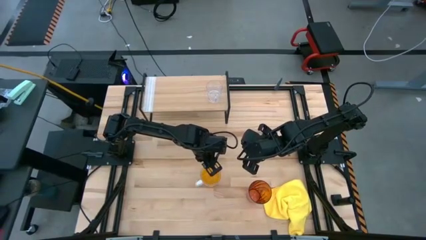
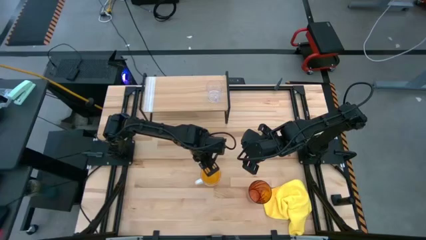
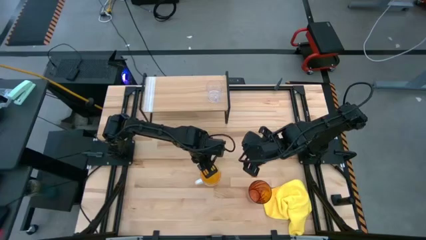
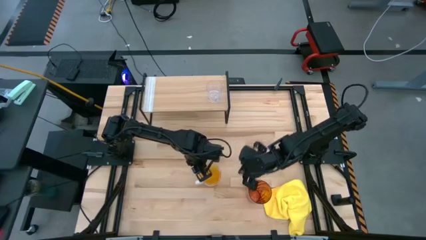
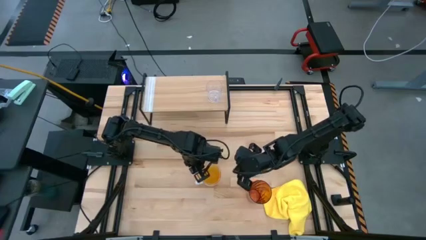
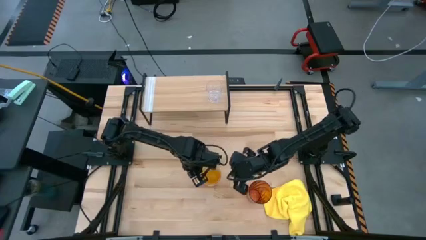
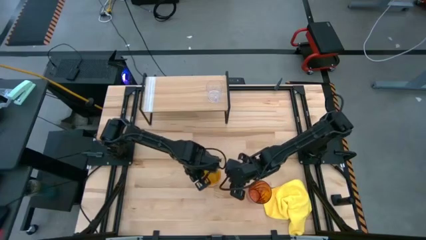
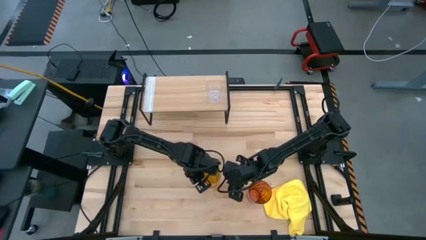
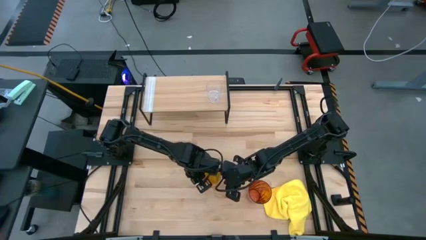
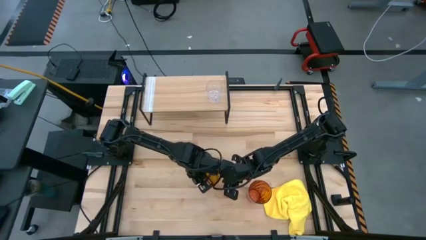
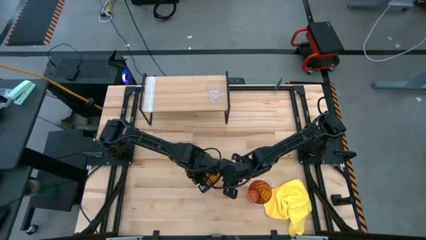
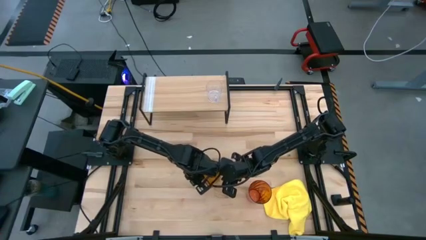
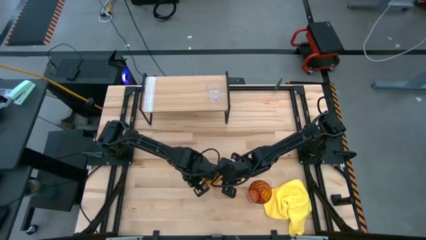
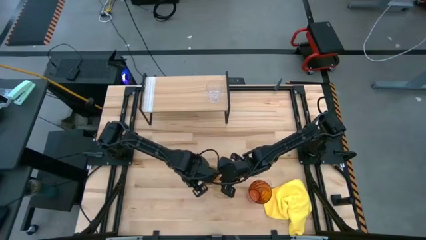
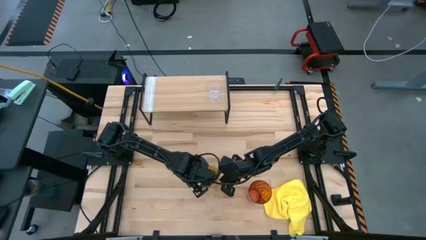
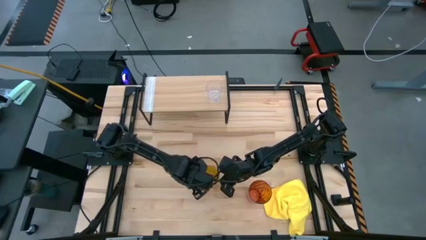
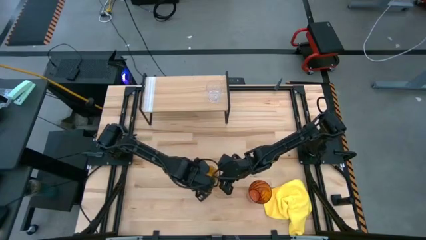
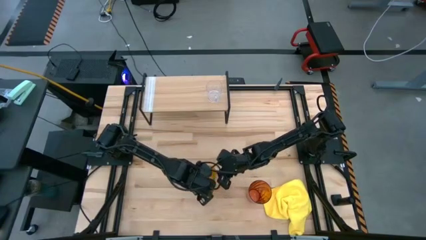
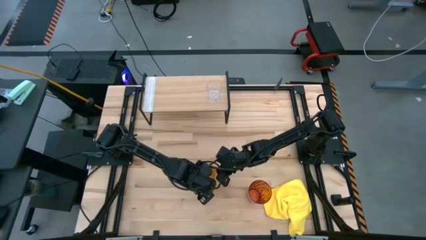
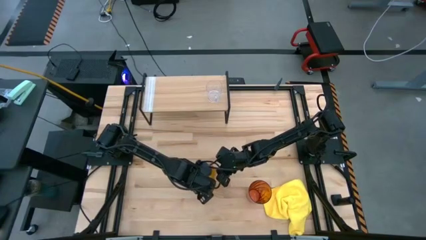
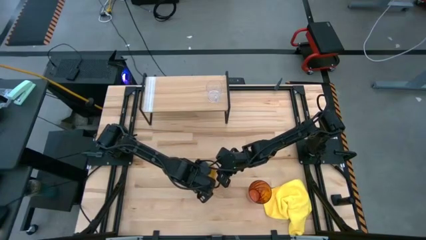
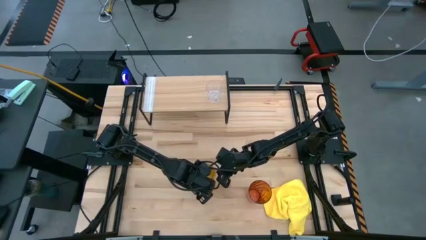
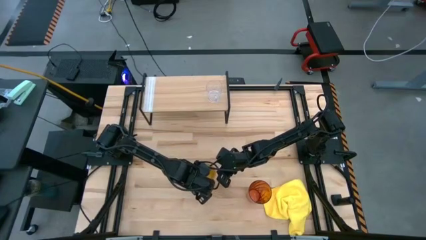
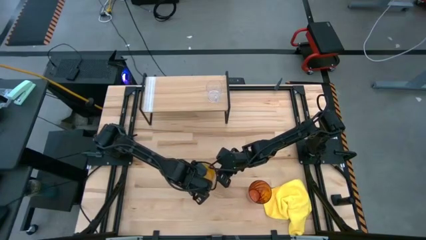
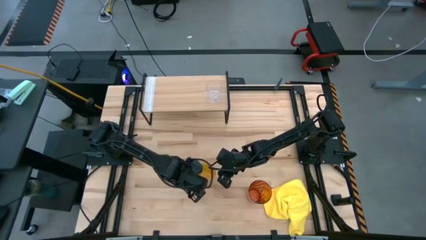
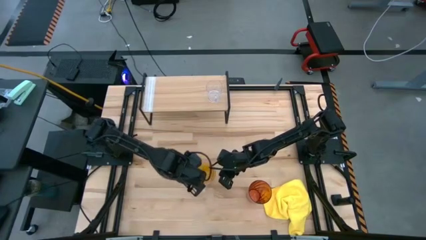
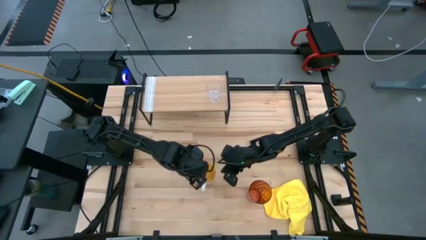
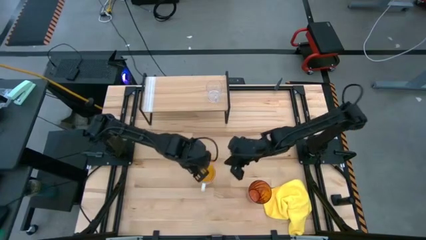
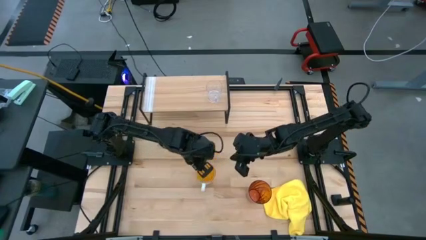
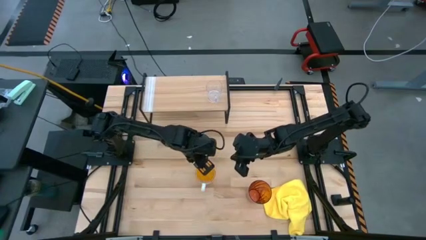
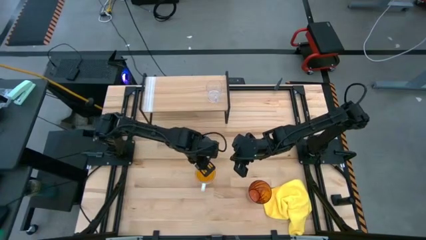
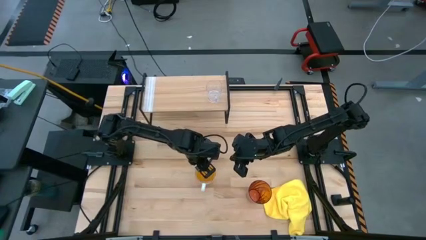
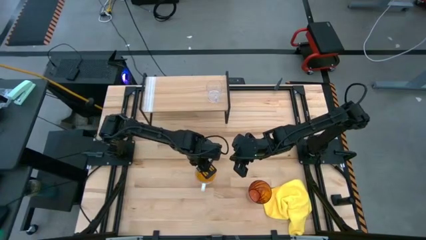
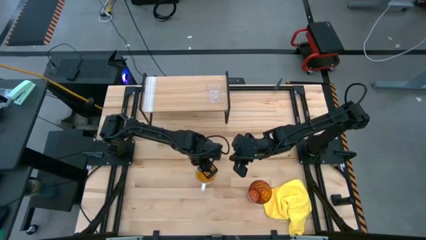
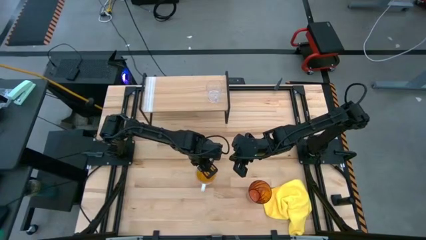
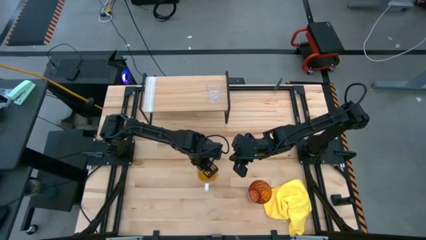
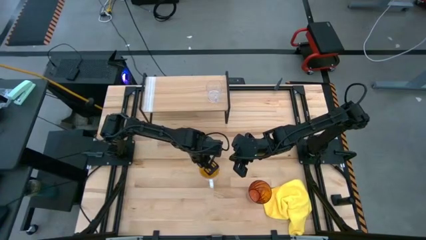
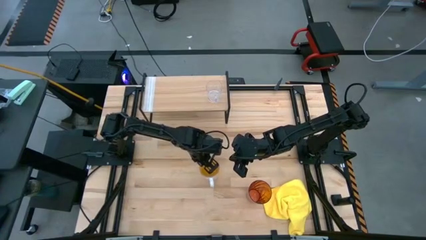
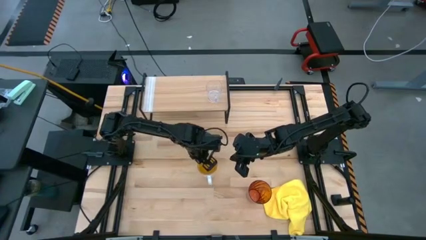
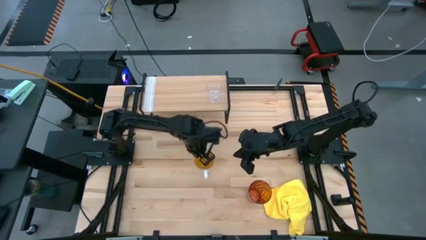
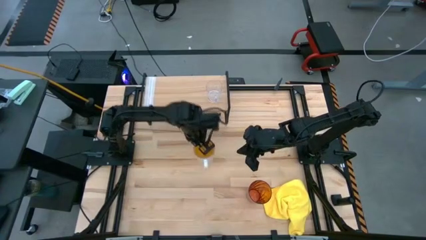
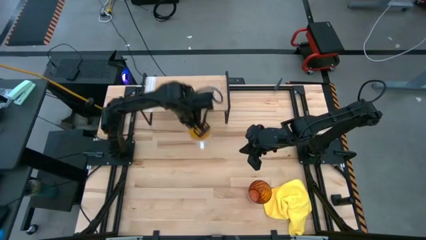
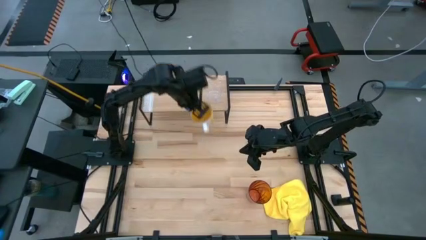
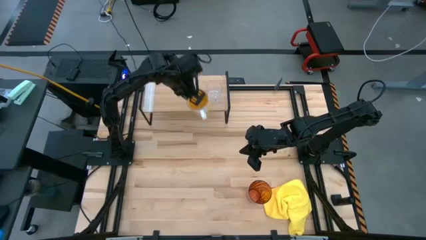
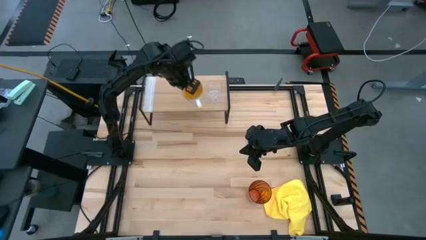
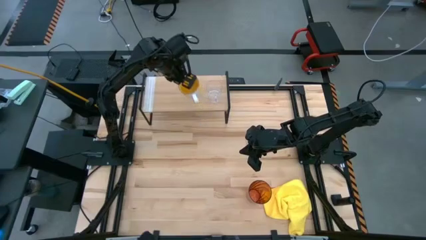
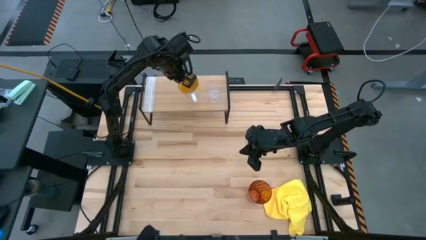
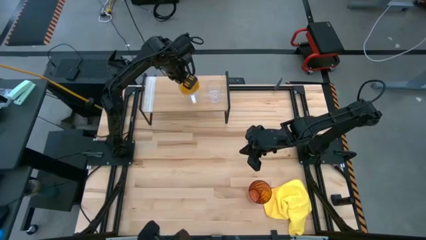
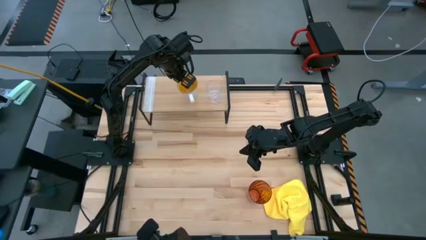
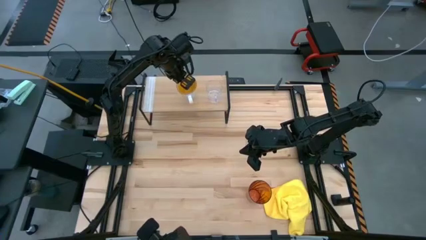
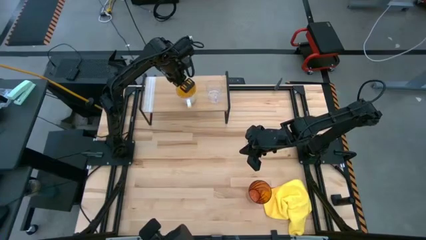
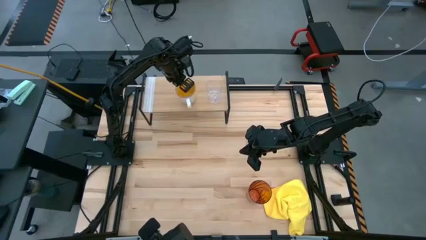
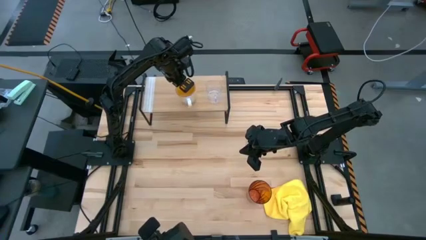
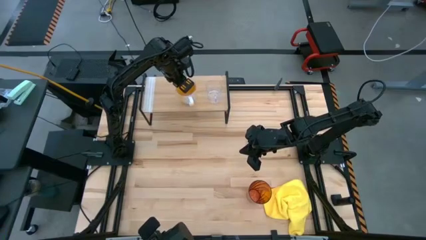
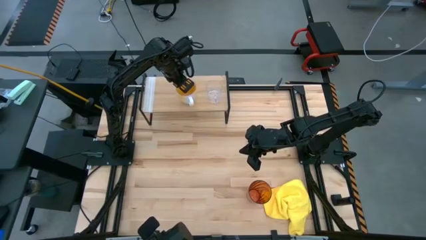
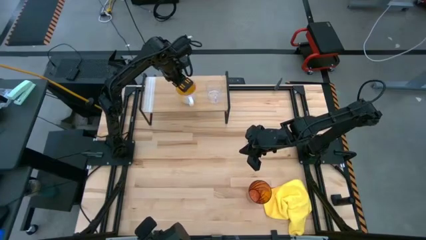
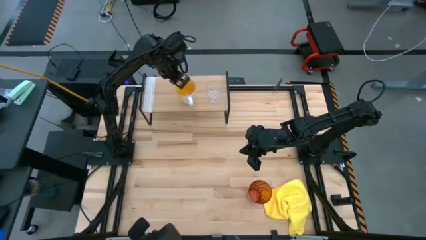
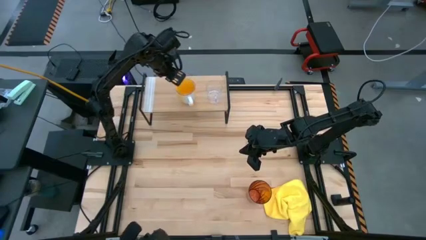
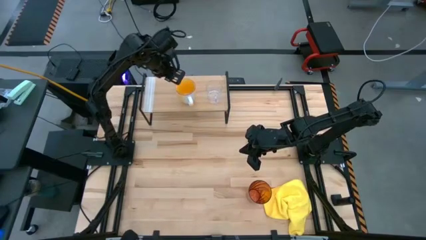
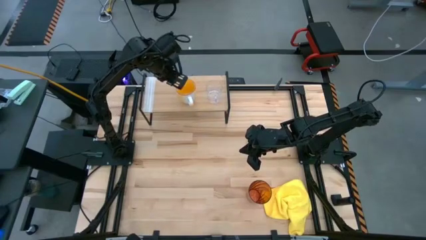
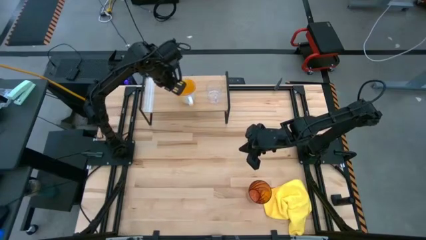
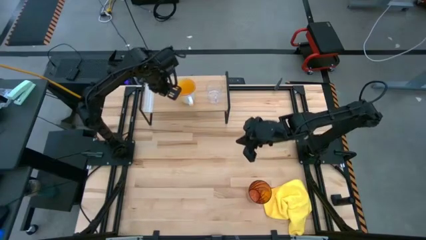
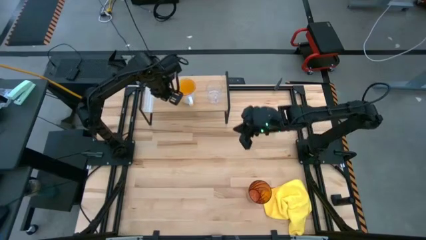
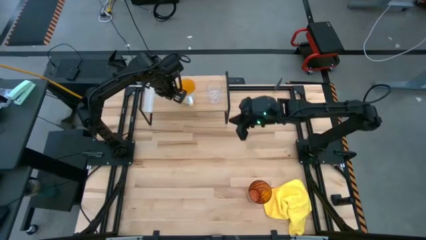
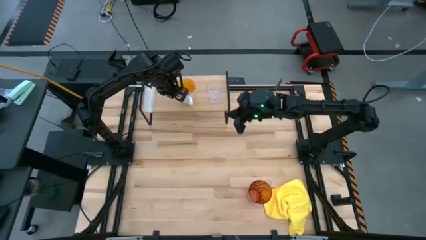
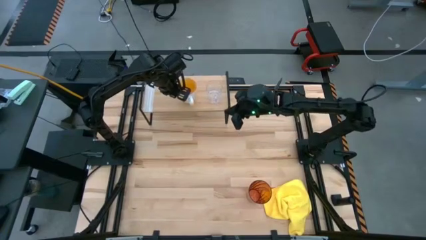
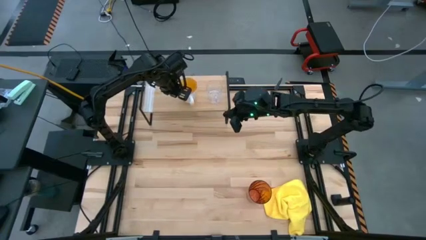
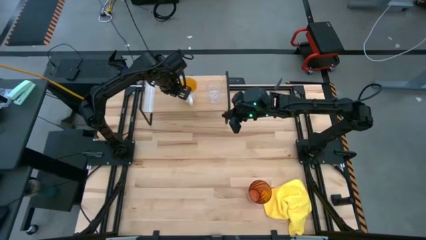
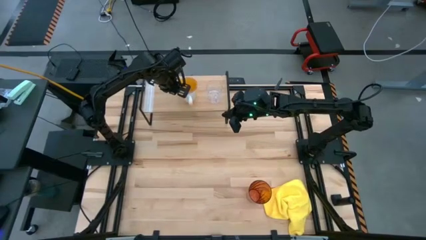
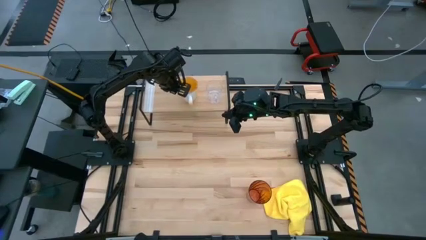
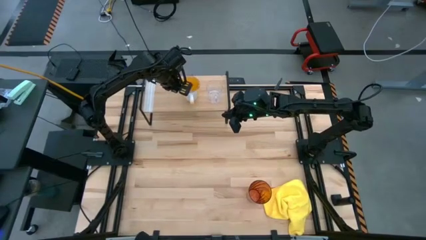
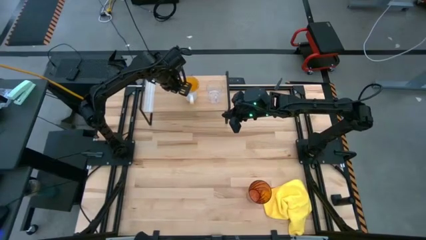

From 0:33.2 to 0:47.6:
Task: Stack small to large cups/mugs on shelf
Put the yellow mug on the shelf
